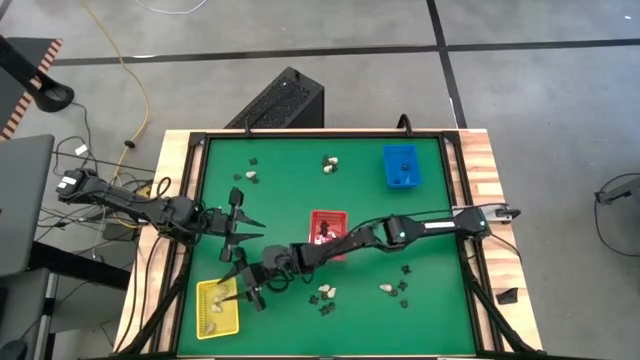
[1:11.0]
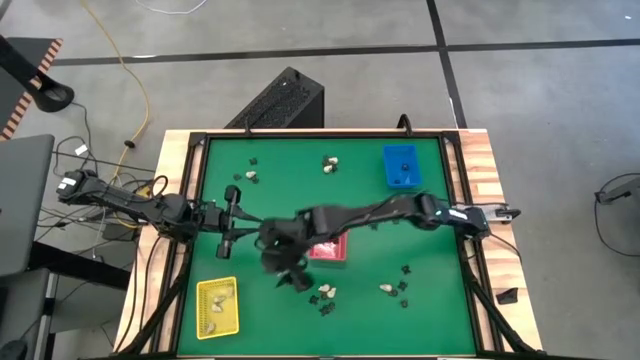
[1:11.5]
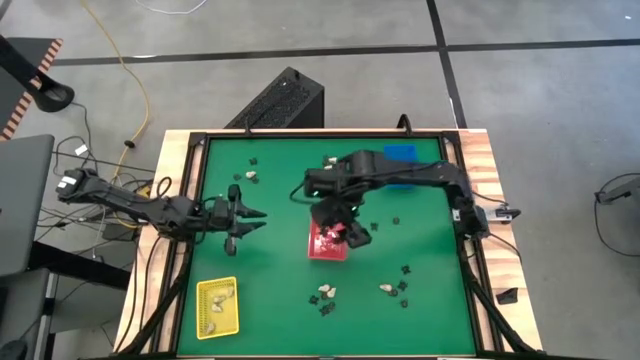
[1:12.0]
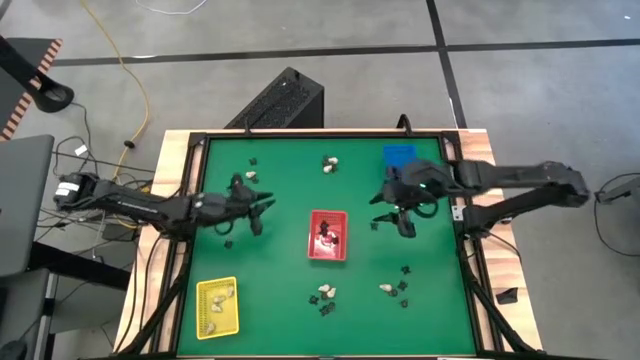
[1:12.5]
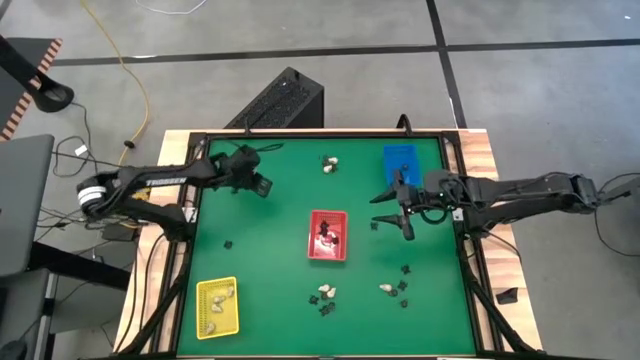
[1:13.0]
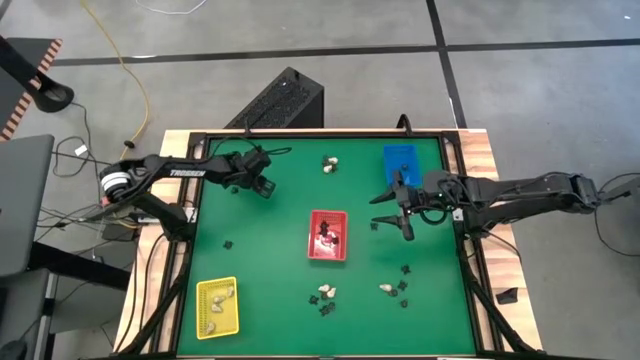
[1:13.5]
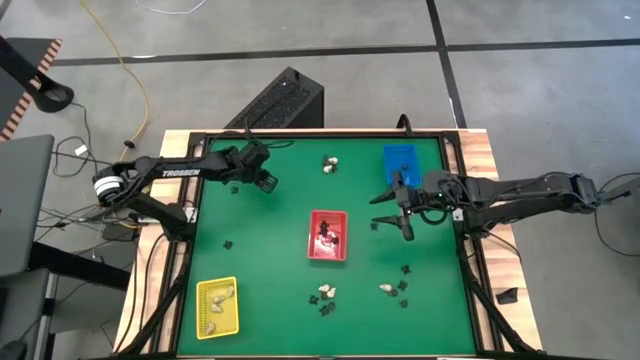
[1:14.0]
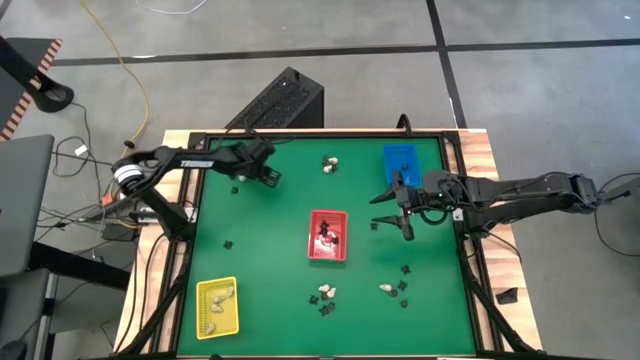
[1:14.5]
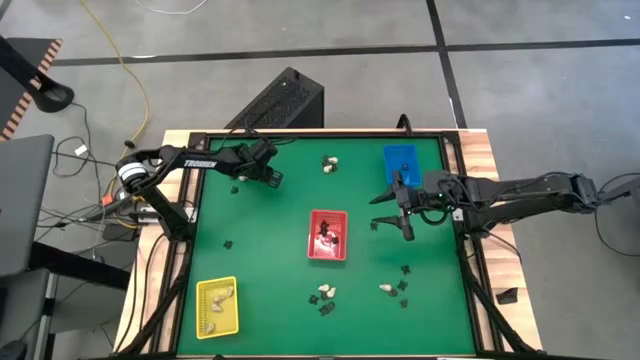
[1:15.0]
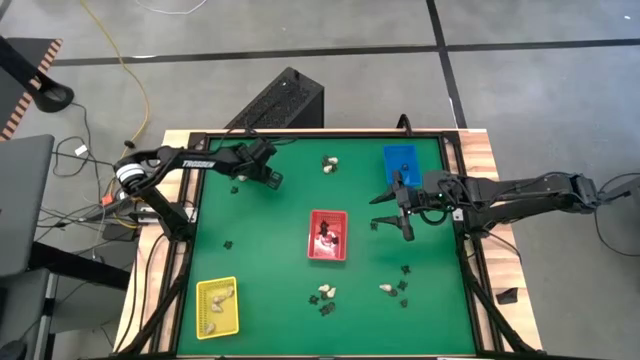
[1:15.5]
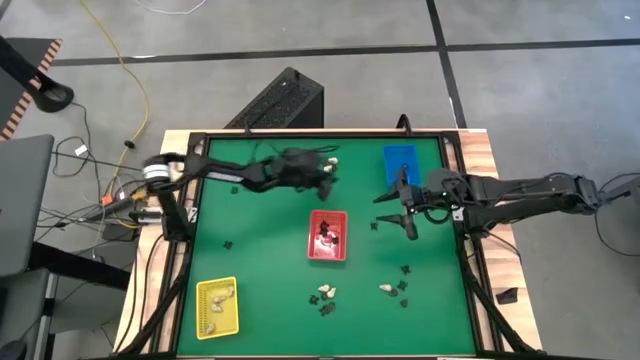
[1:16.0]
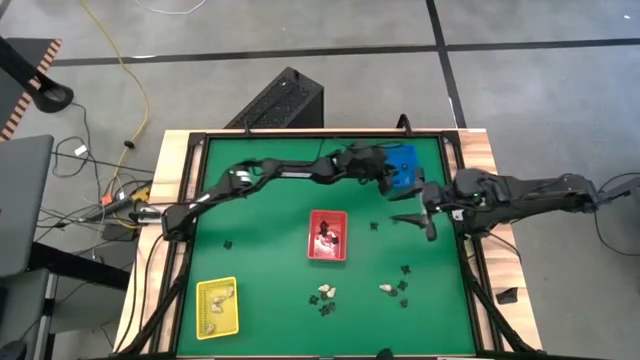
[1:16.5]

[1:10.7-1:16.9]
Task: Sort Halloween decoration
Put the black skull toy into the blue bin

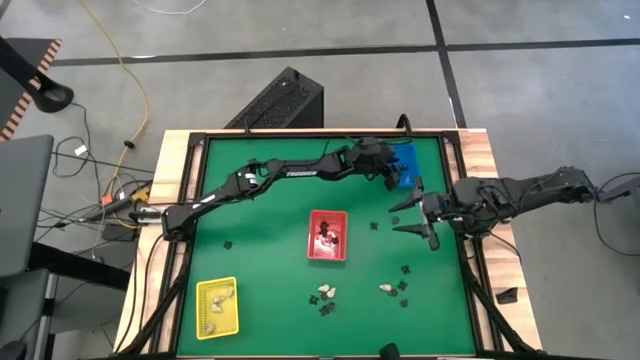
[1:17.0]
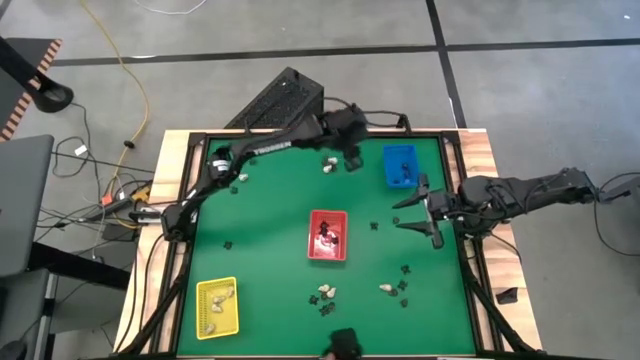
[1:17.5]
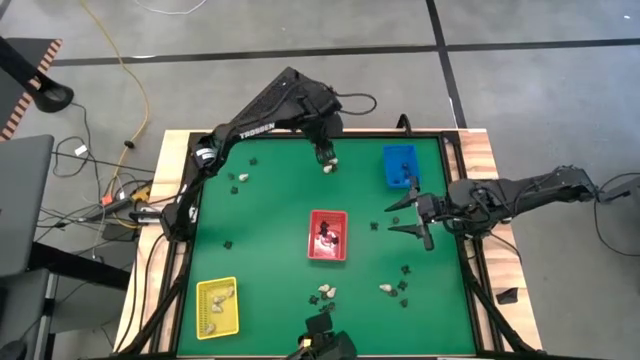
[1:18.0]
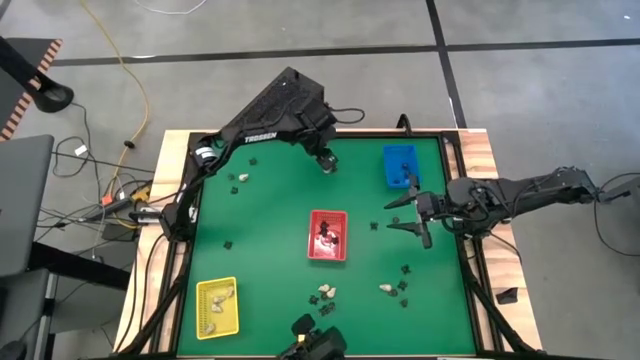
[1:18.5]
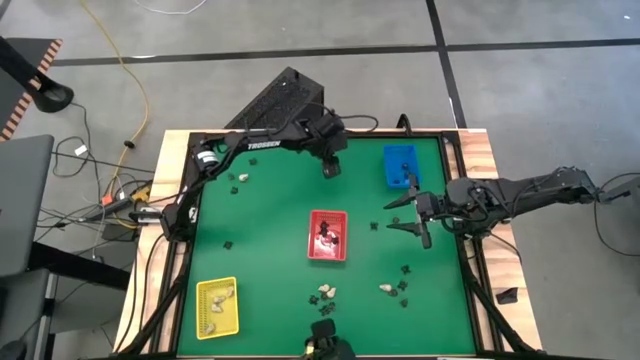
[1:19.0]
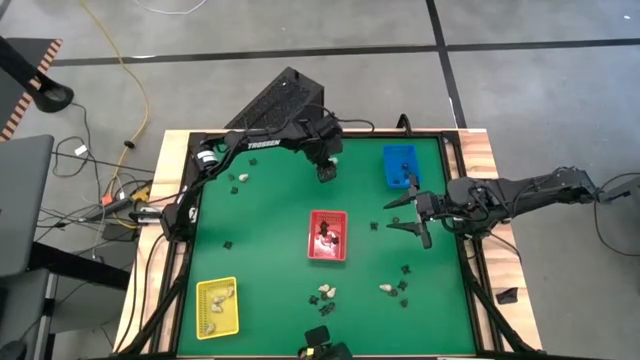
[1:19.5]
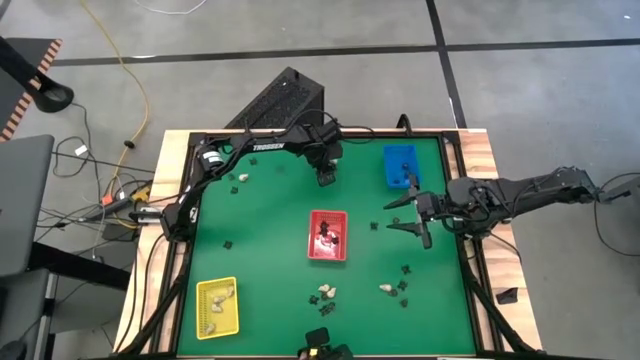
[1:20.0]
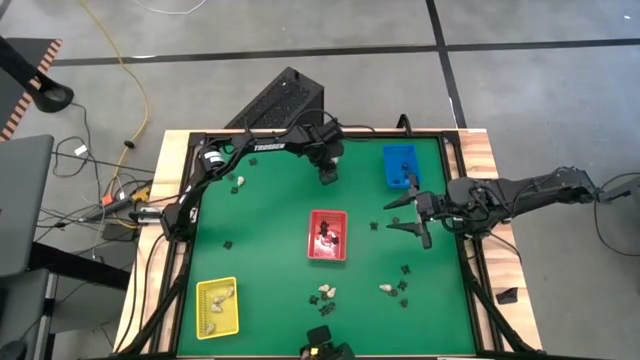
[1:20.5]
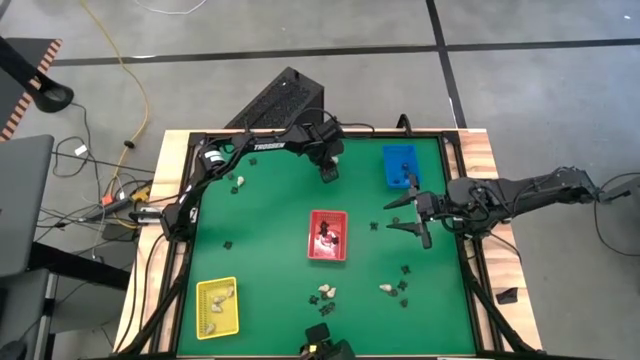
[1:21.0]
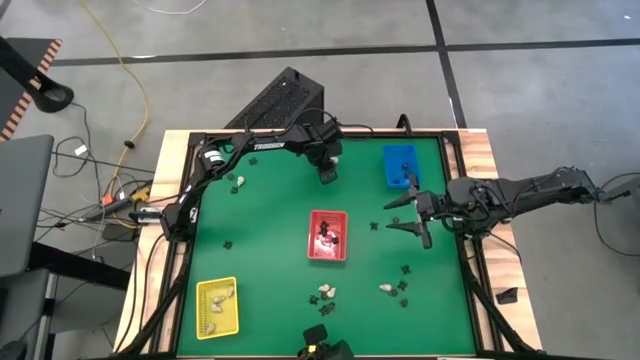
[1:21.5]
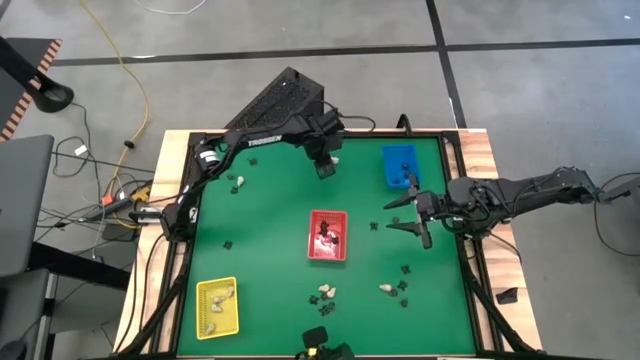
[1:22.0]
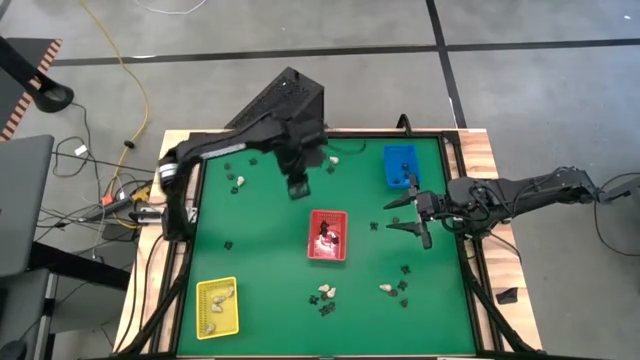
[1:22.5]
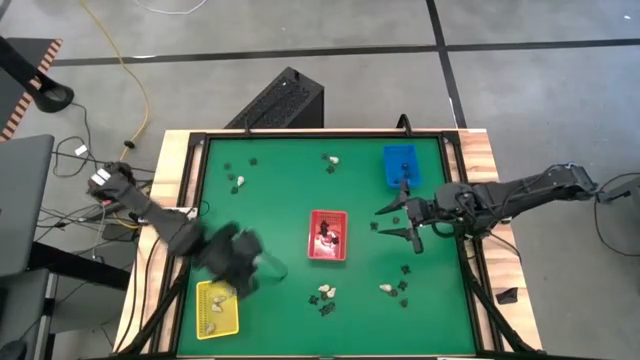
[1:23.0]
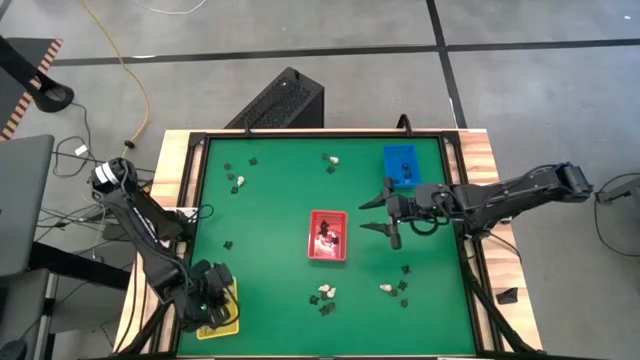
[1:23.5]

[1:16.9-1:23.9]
Put the white skull toy into the yellow bin

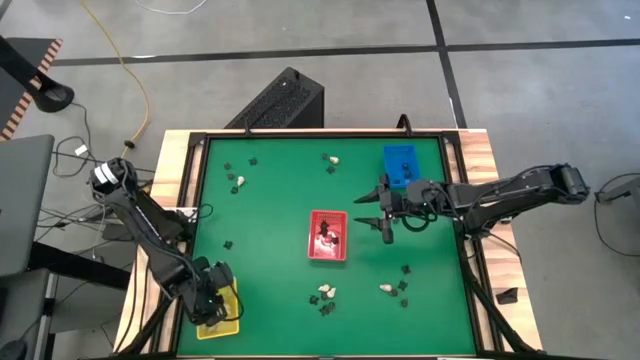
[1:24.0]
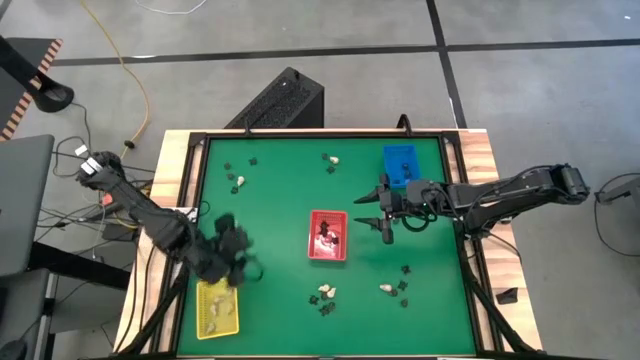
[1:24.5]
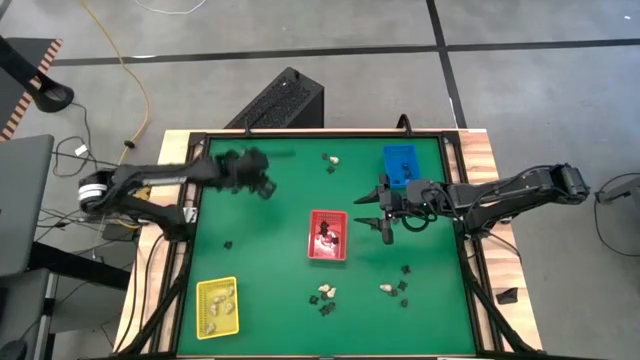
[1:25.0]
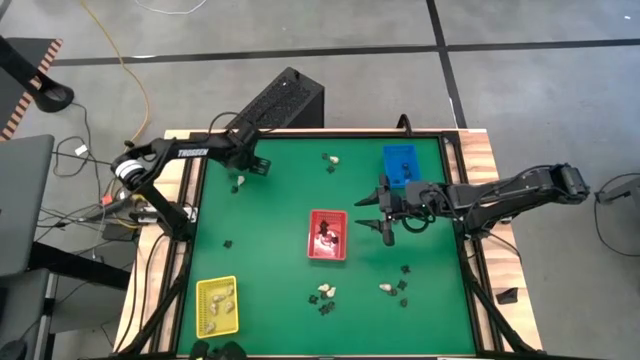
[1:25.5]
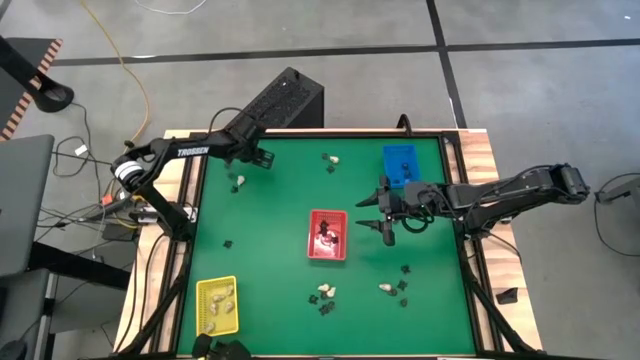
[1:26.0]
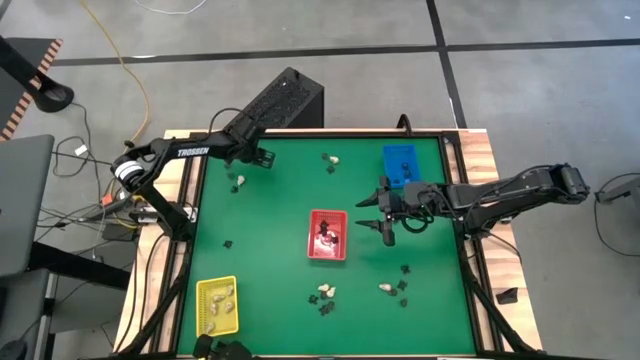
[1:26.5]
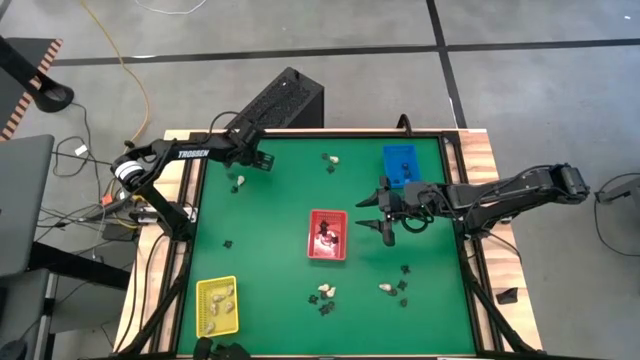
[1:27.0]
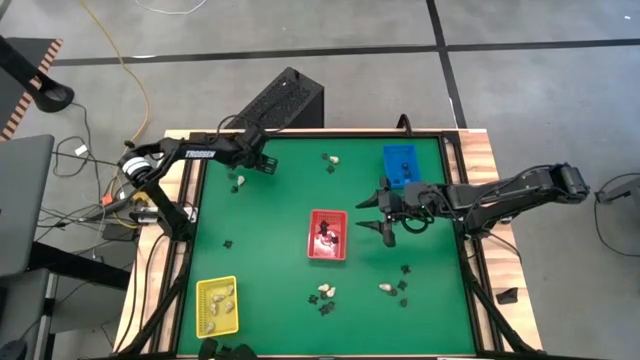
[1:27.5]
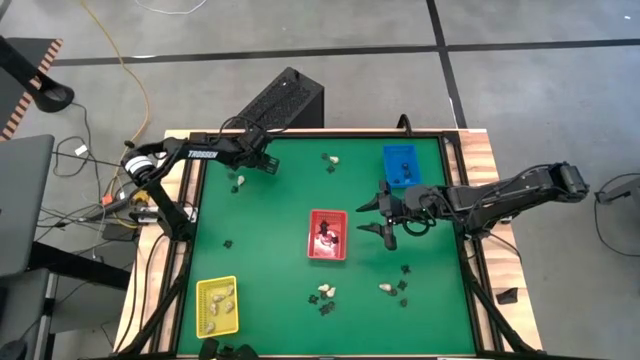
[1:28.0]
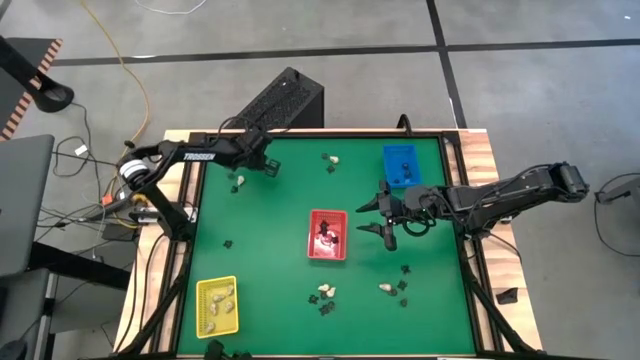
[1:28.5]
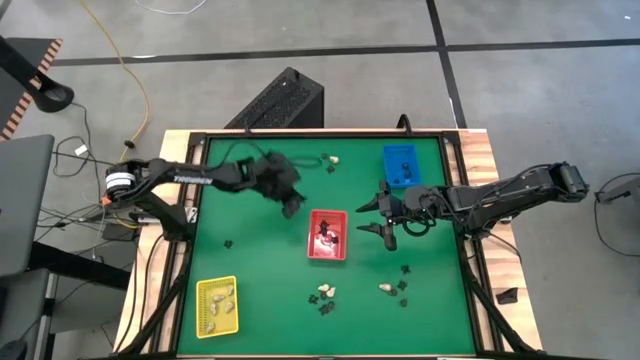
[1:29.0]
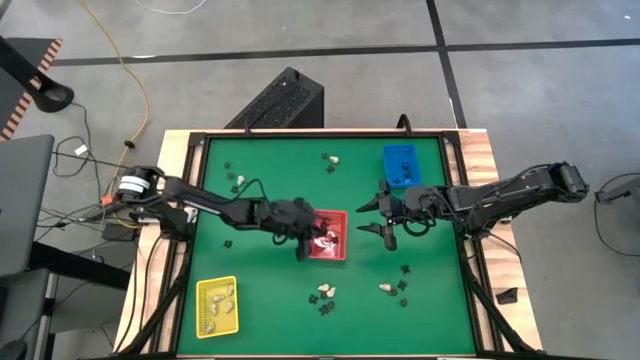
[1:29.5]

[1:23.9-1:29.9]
Put the black spider toy into the red bin

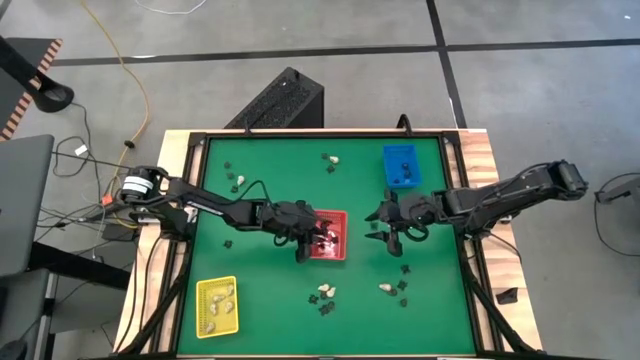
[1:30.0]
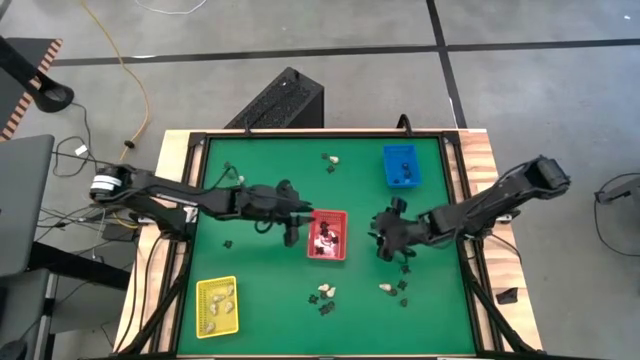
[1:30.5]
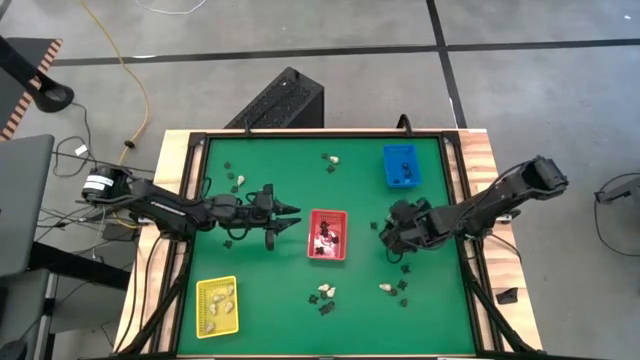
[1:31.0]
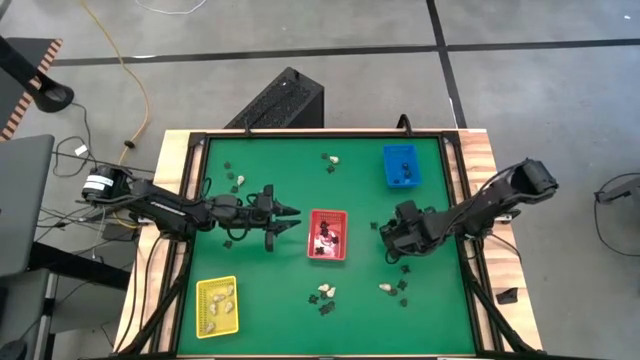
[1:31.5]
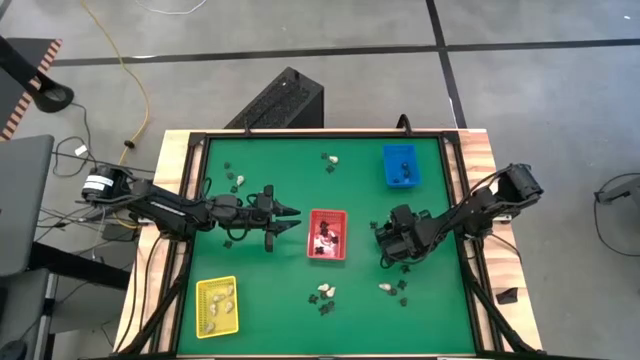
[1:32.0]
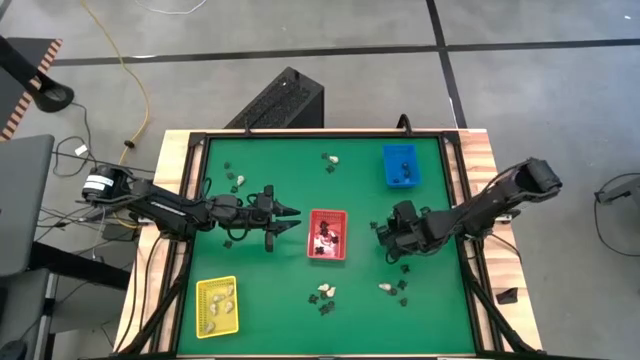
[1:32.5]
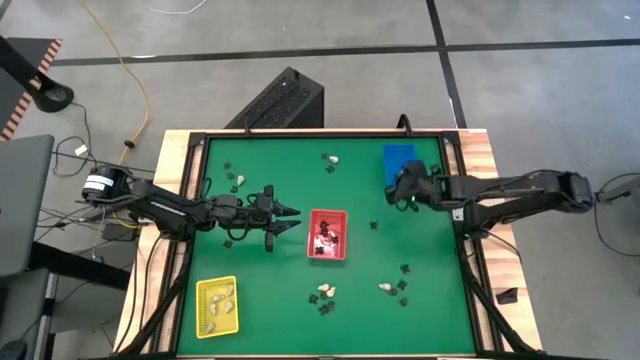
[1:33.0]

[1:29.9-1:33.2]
Put the black skull toy into the blue bin
